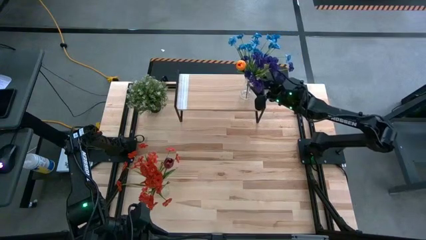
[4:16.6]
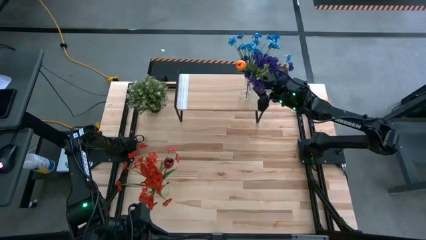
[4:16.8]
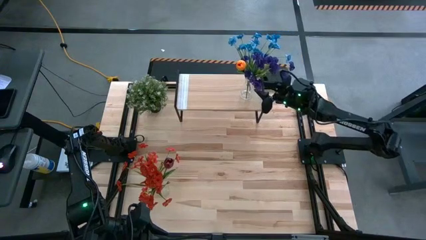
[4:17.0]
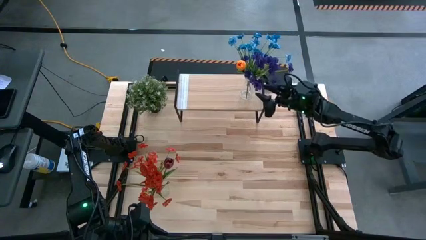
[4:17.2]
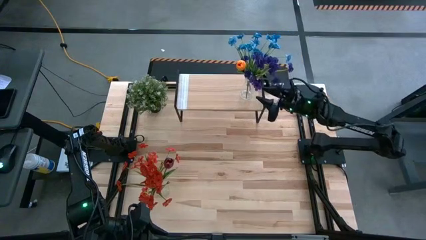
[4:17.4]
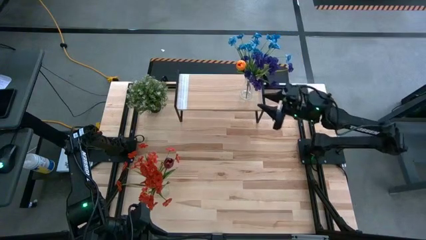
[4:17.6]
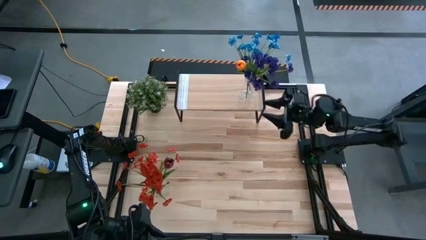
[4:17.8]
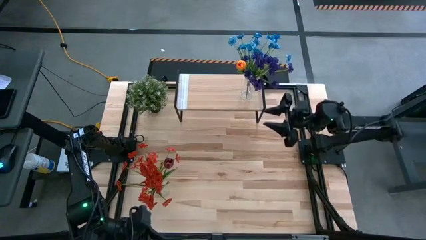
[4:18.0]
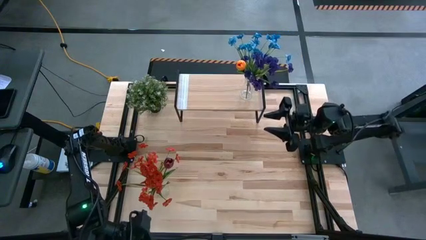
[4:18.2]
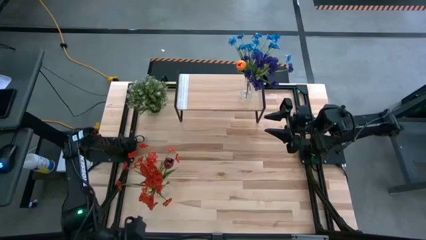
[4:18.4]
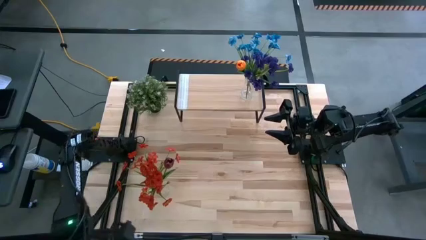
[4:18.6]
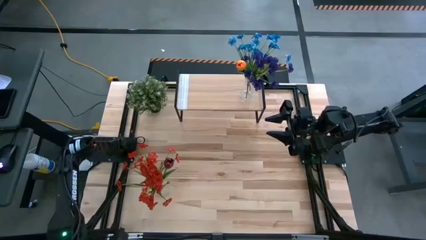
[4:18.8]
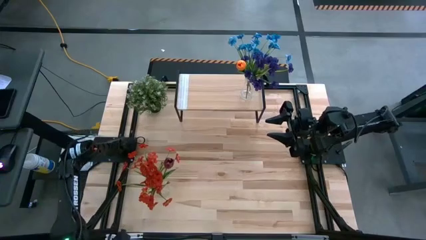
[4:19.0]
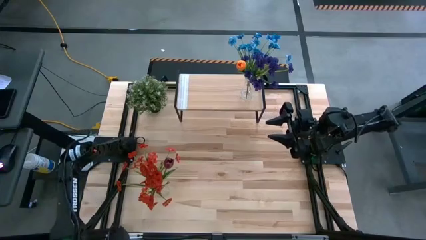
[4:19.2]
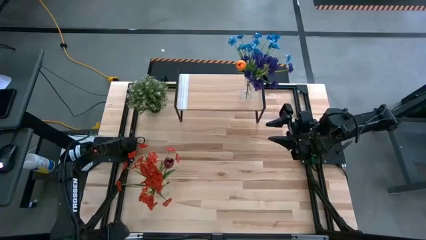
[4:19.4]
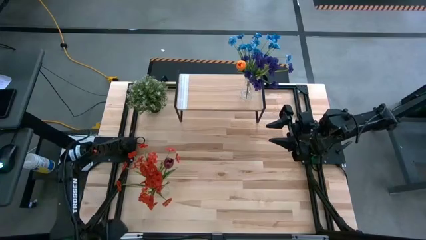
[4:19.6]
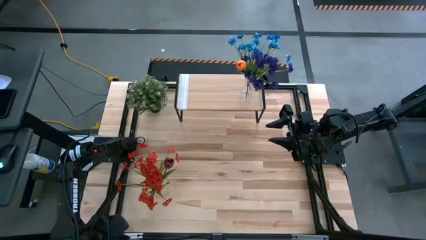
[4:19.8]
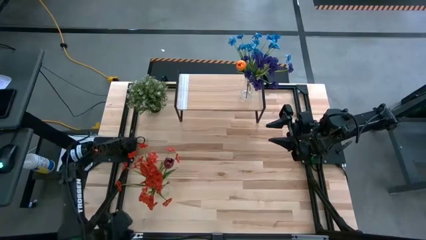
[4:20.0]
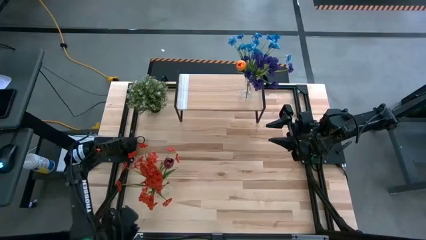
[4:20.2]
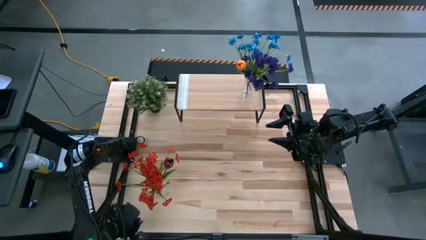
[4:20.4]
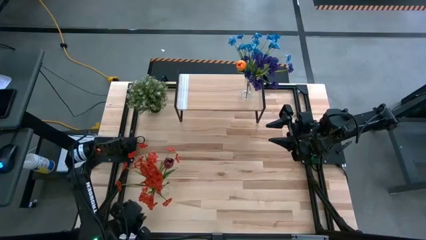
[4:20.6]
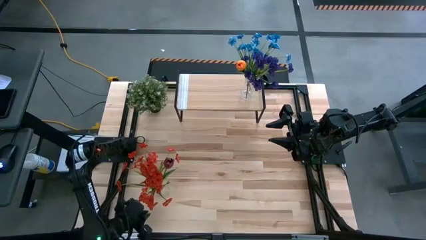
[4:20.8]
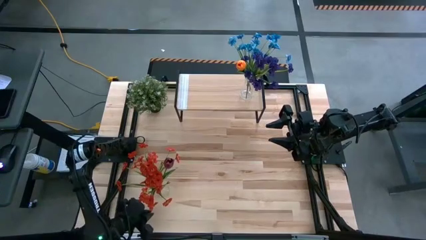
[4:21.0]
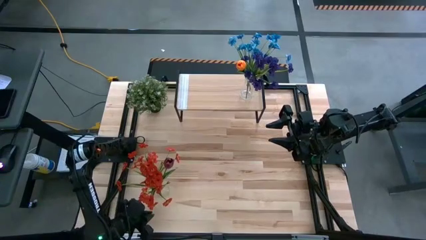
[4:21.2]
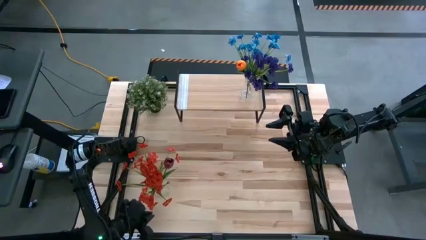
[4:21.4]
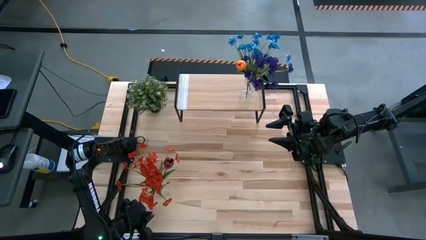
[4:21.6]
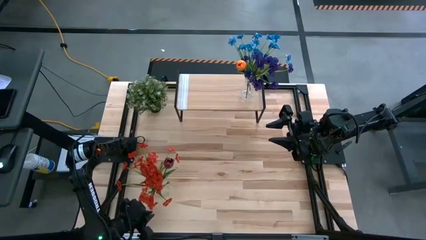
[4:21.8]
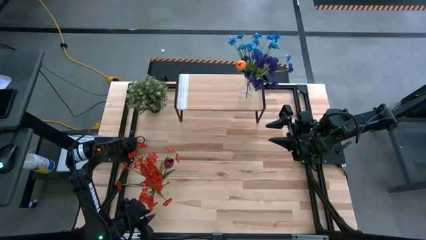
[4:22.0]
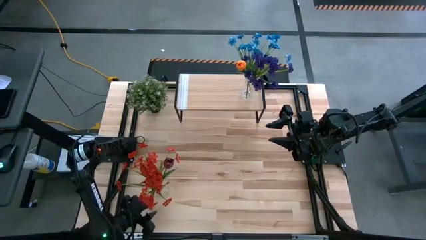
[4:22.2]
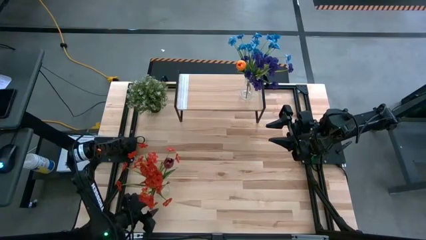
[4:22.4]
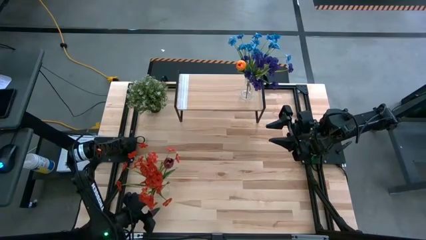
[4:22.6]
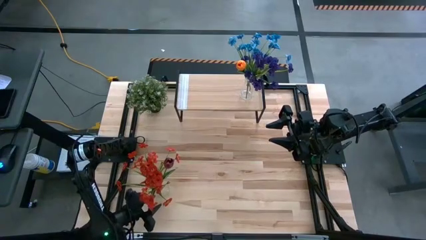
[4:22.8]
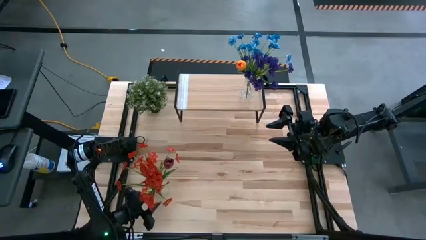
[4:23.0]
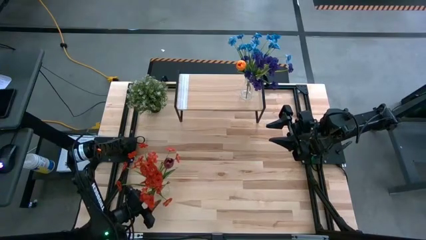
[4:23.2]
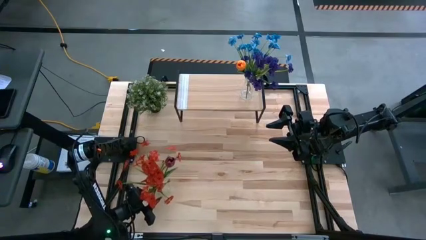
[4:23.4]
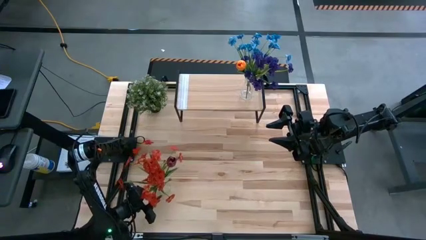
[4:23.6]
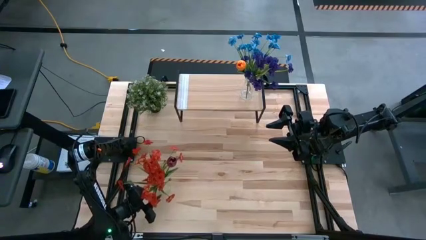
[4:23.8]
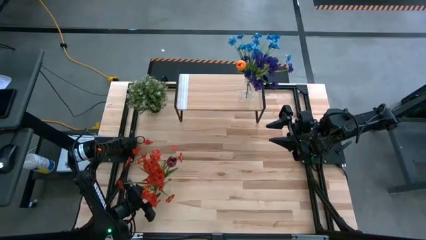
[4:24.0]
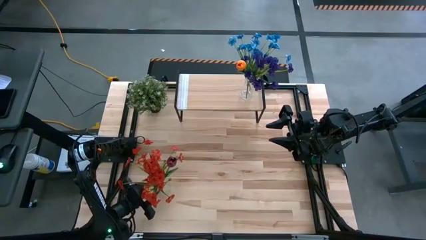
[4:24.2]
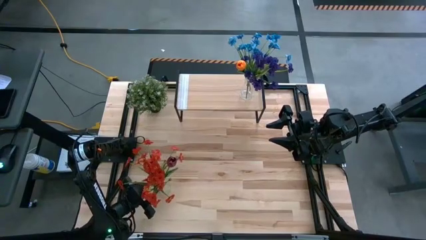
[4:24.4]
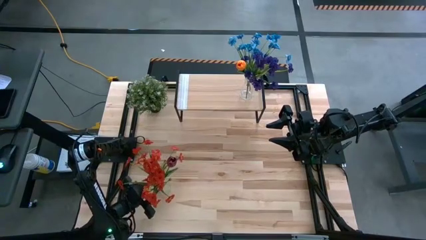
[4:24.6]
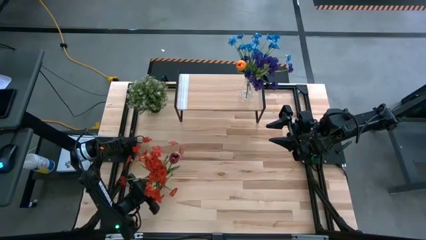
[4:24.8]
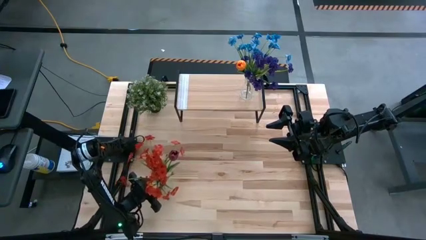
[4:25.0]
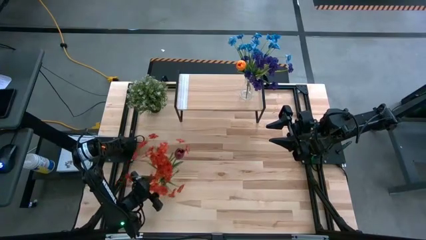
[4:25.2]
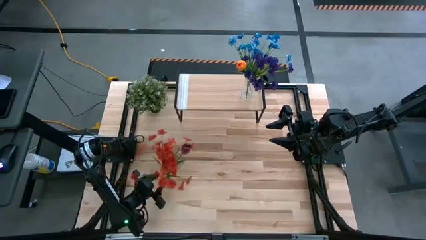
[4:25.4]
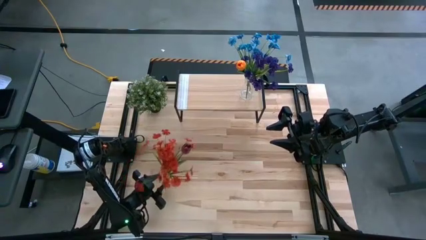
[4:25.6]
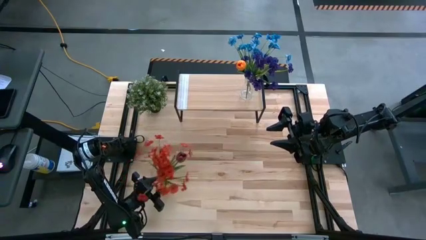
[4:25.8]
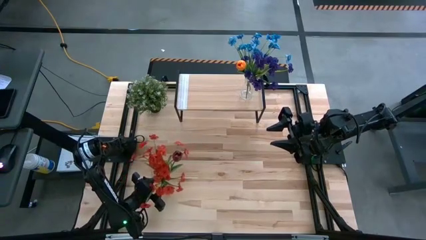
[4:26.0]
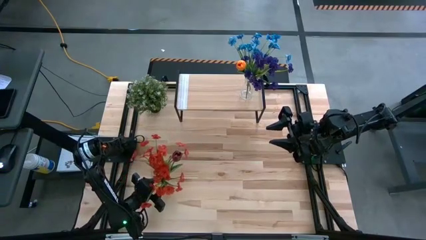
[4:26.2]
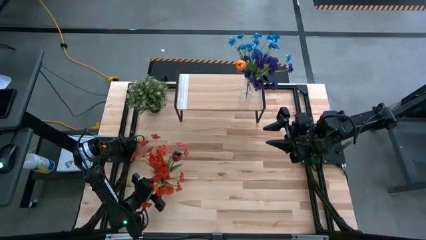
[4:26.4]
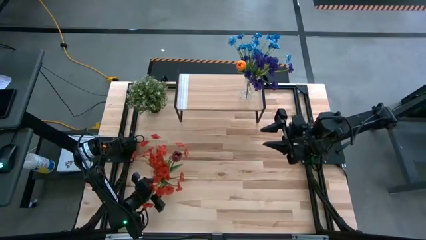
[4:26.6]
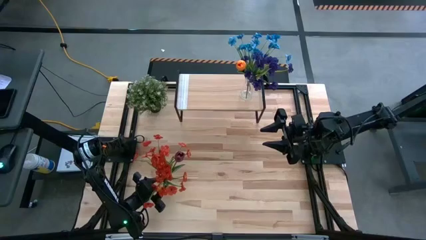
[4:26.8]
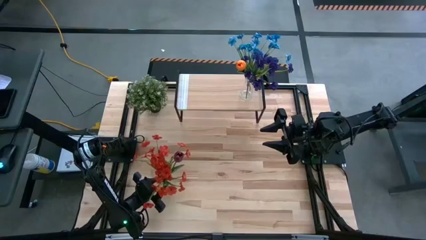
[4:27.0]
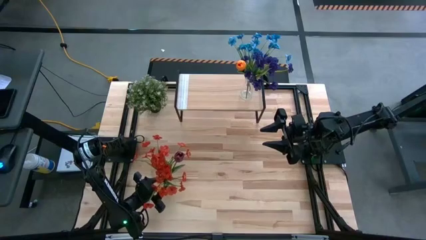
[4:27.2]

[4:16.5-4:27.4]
Task: Pick and place flowers into a vace then onto a shelf
Put the transparent vase with flowers on the shelf
